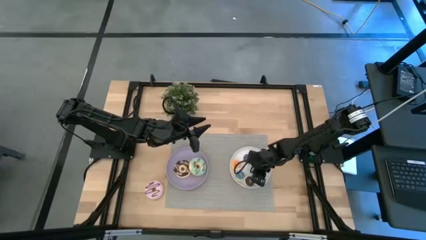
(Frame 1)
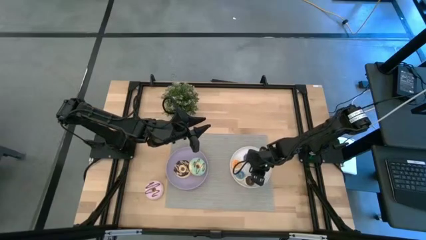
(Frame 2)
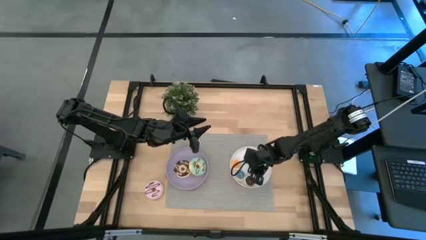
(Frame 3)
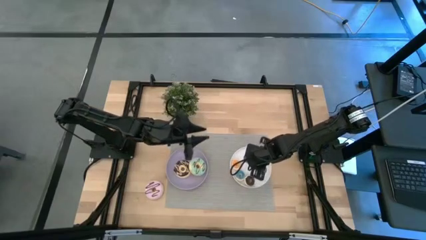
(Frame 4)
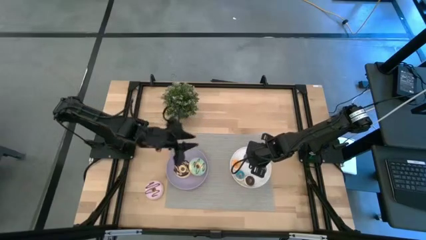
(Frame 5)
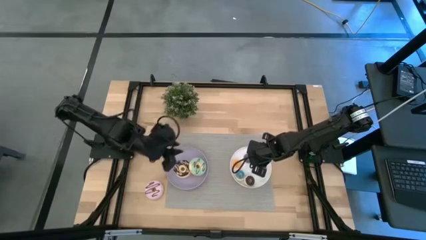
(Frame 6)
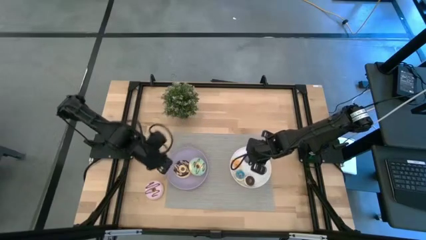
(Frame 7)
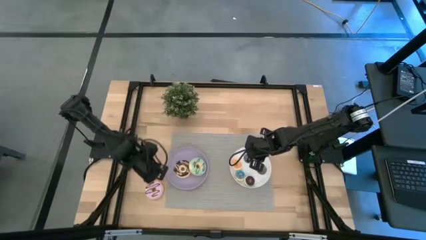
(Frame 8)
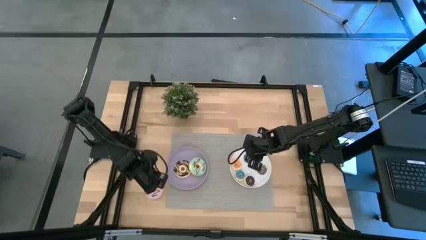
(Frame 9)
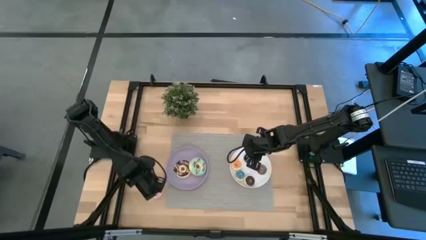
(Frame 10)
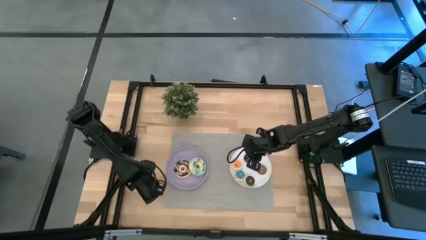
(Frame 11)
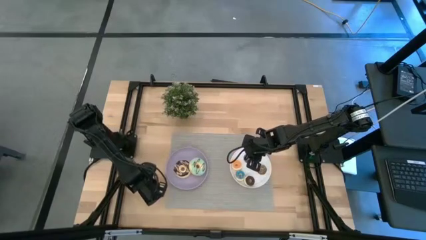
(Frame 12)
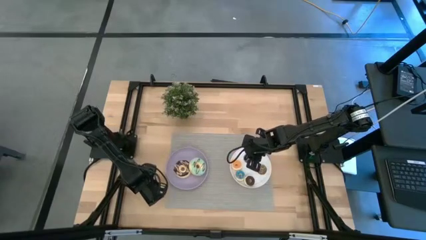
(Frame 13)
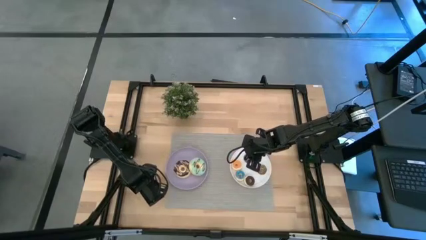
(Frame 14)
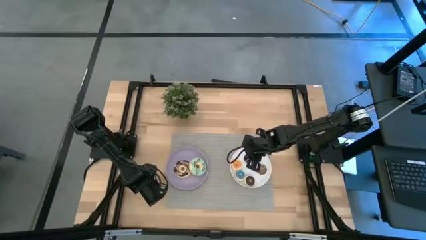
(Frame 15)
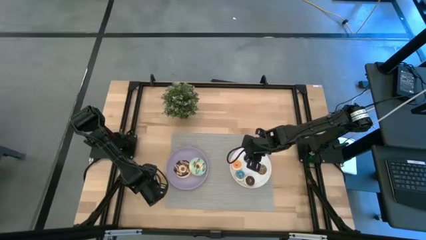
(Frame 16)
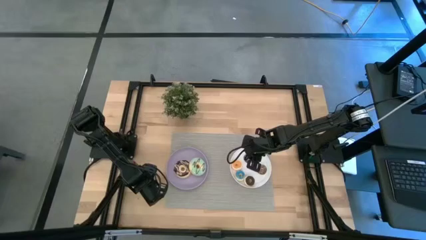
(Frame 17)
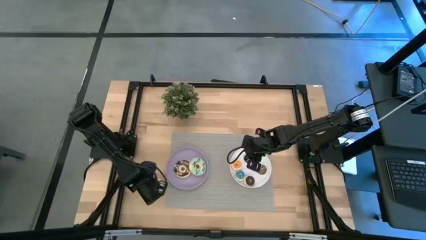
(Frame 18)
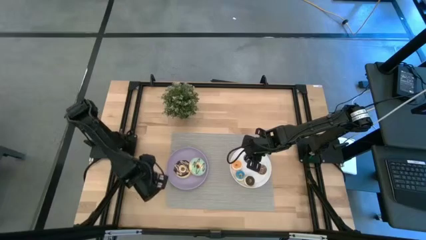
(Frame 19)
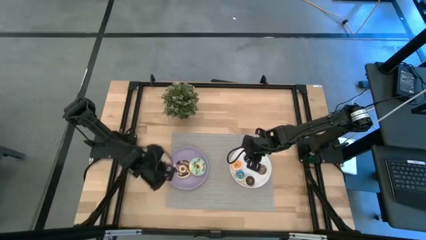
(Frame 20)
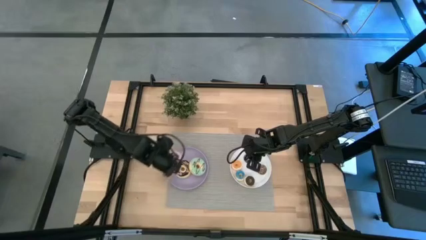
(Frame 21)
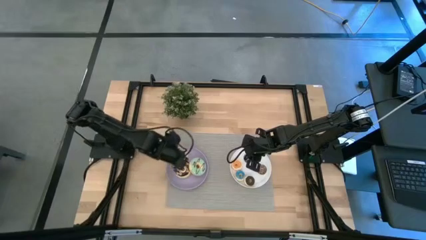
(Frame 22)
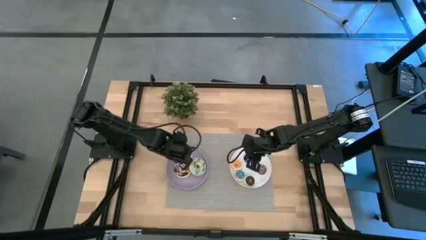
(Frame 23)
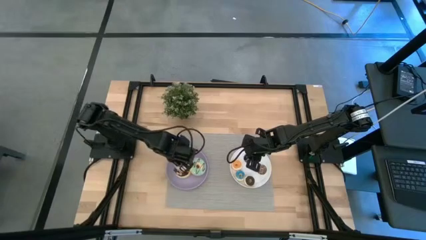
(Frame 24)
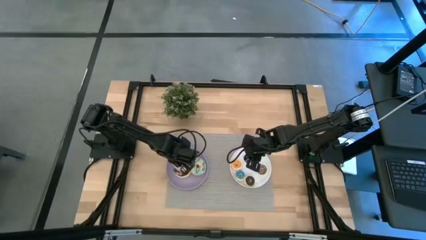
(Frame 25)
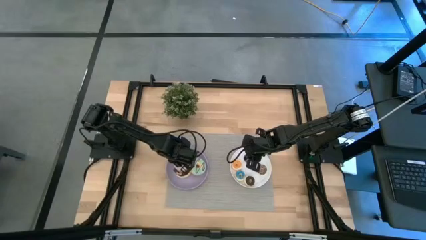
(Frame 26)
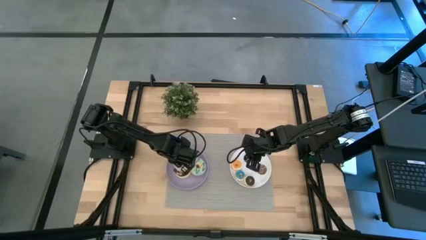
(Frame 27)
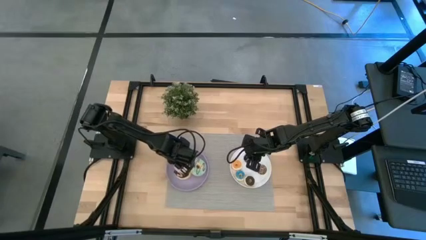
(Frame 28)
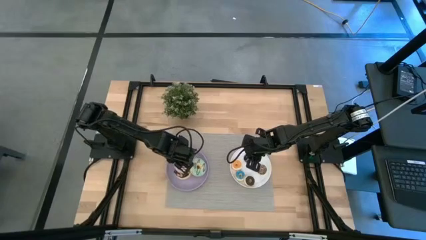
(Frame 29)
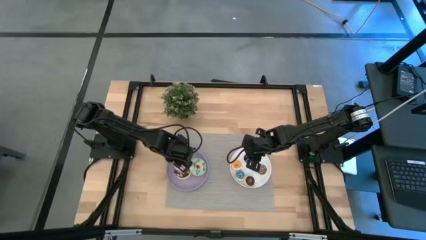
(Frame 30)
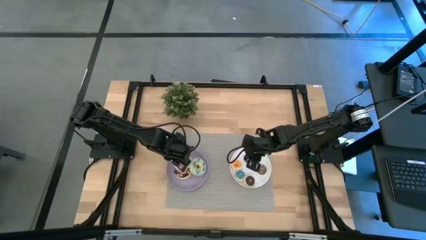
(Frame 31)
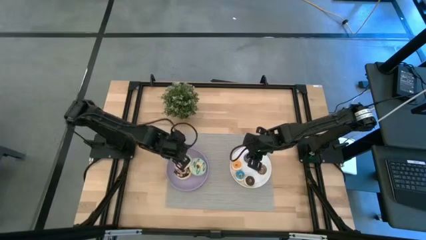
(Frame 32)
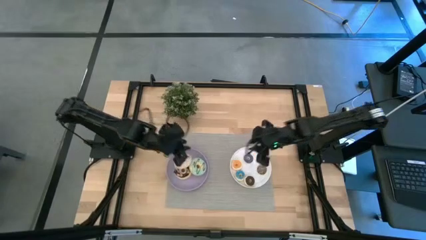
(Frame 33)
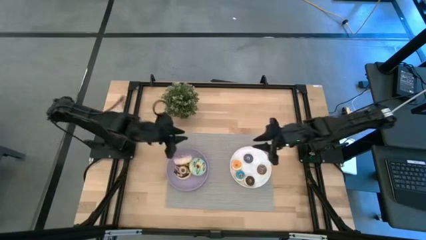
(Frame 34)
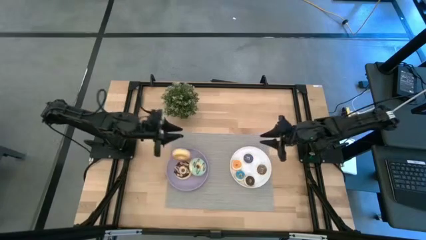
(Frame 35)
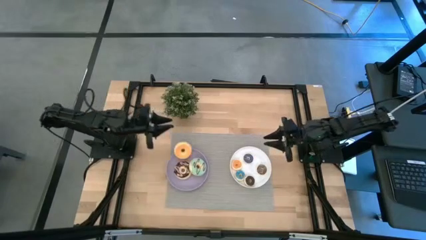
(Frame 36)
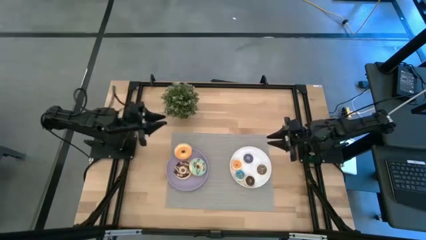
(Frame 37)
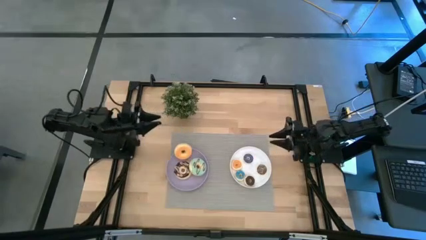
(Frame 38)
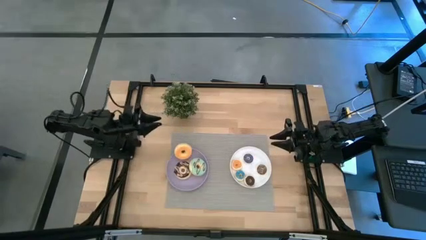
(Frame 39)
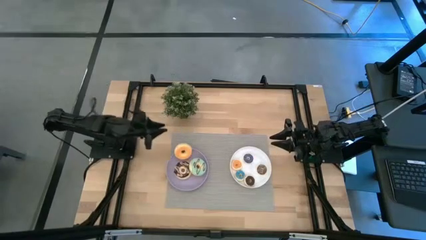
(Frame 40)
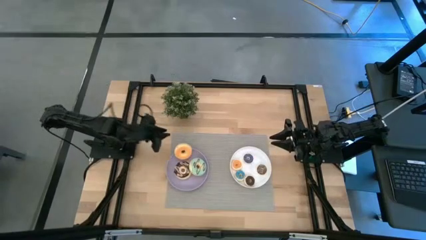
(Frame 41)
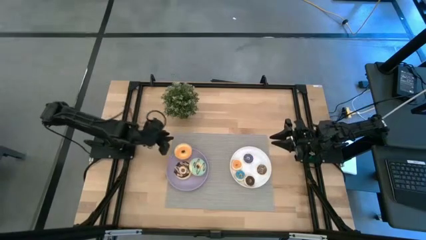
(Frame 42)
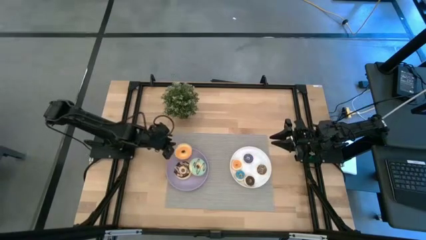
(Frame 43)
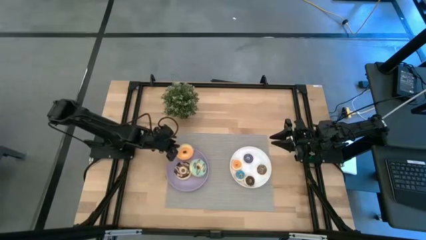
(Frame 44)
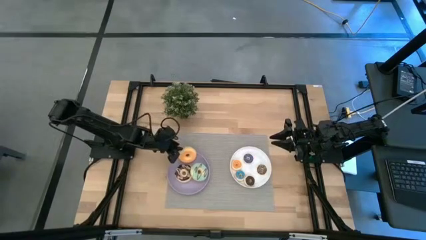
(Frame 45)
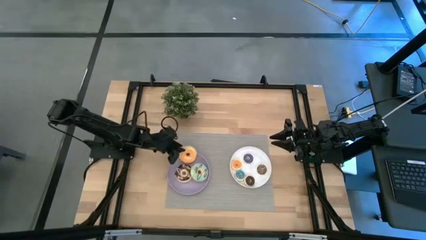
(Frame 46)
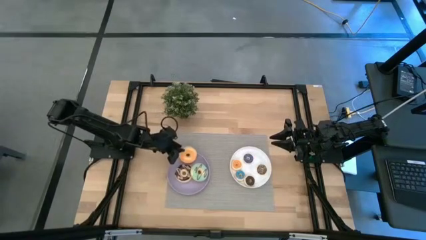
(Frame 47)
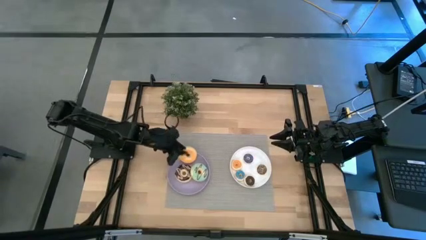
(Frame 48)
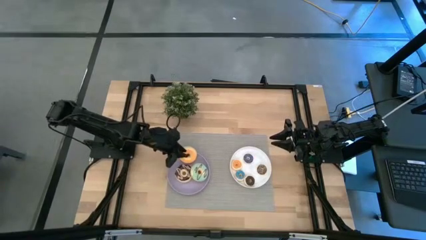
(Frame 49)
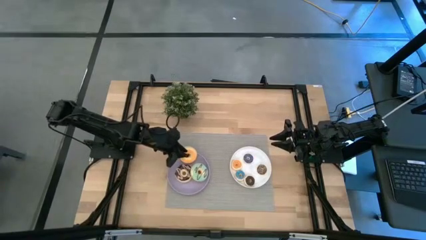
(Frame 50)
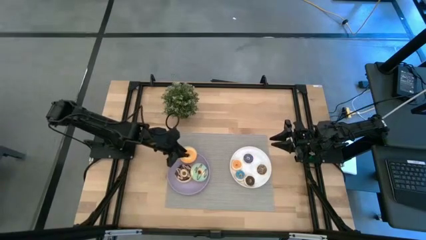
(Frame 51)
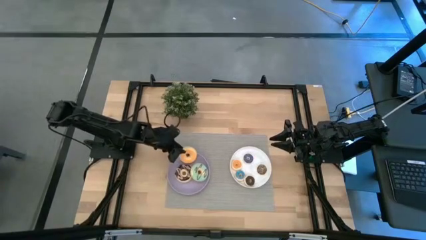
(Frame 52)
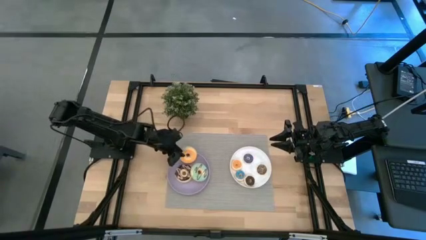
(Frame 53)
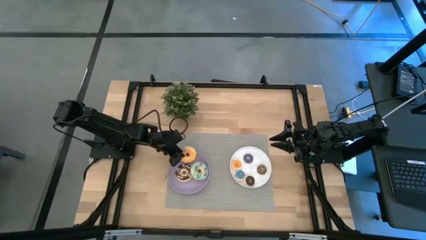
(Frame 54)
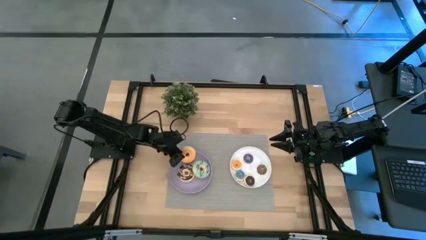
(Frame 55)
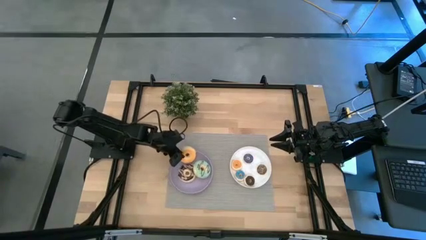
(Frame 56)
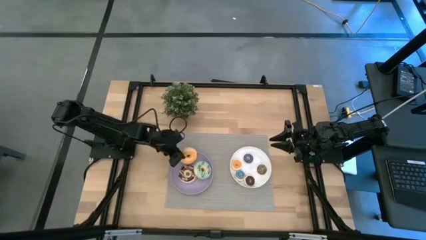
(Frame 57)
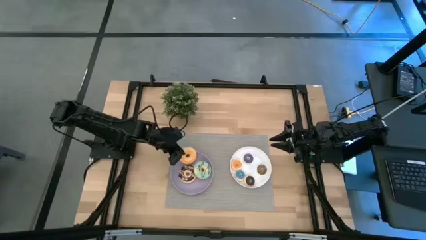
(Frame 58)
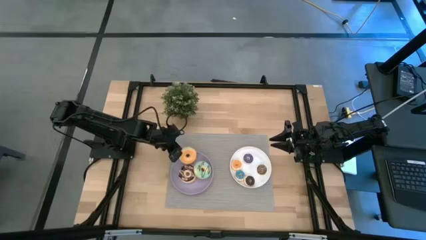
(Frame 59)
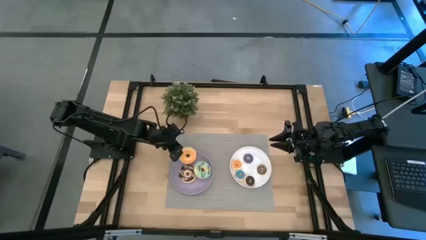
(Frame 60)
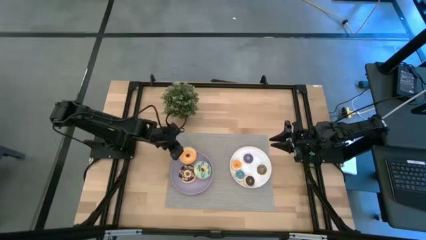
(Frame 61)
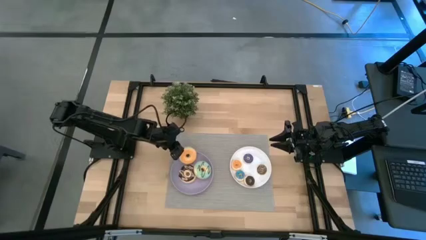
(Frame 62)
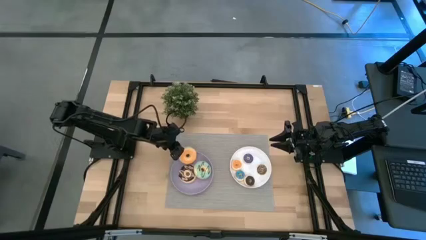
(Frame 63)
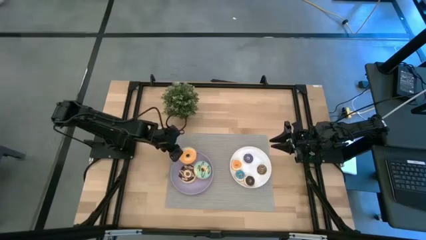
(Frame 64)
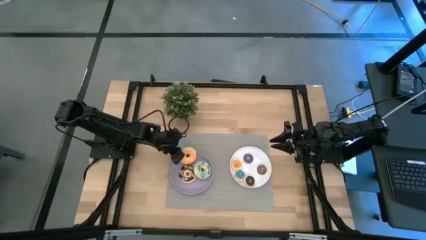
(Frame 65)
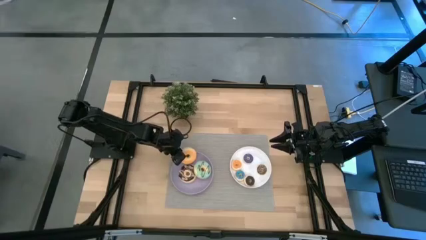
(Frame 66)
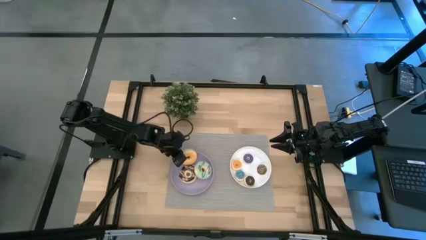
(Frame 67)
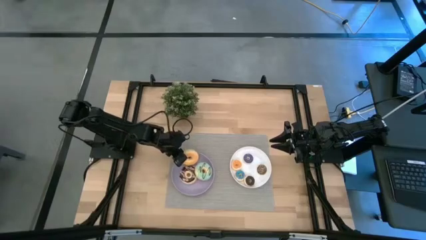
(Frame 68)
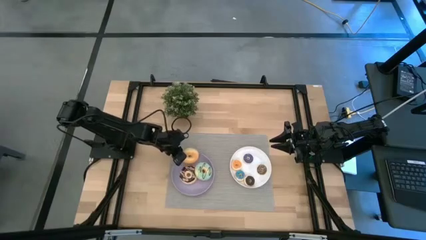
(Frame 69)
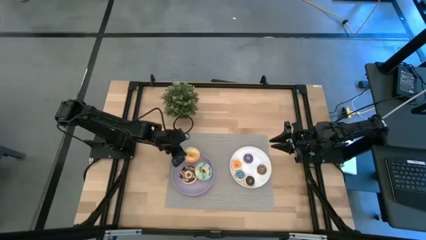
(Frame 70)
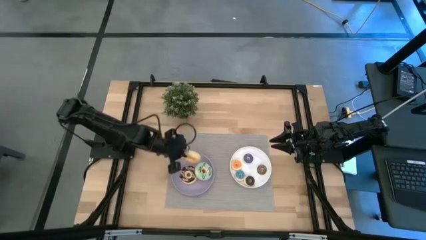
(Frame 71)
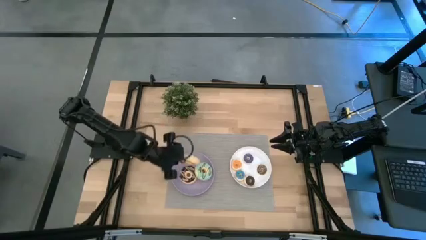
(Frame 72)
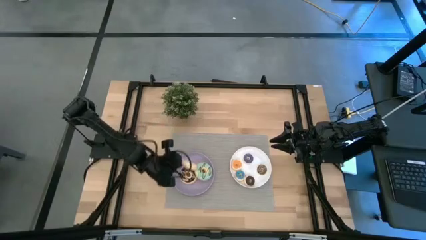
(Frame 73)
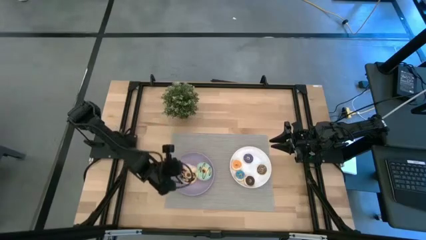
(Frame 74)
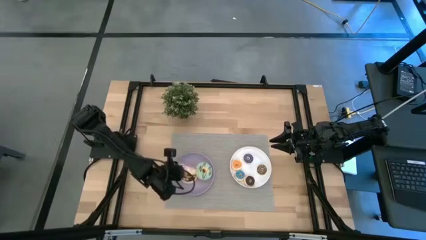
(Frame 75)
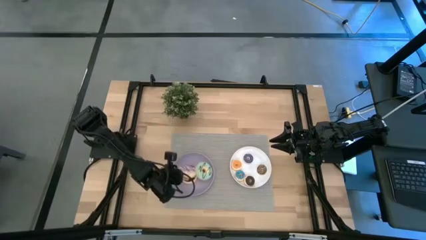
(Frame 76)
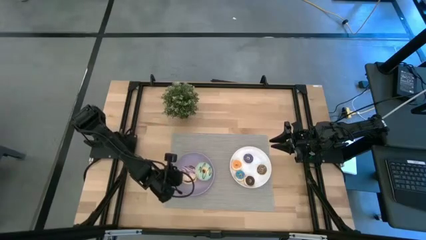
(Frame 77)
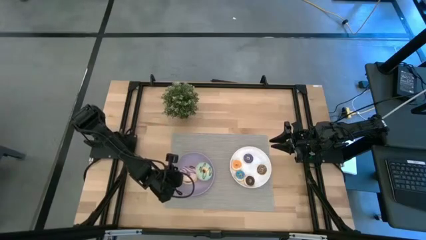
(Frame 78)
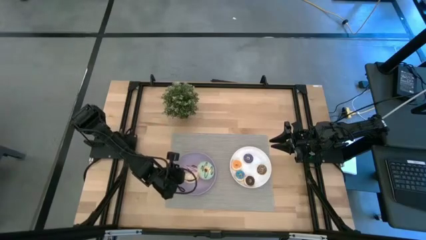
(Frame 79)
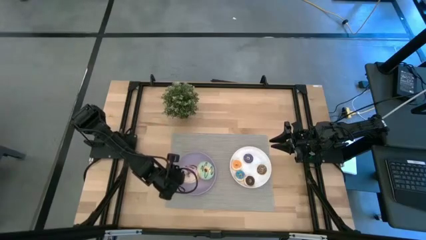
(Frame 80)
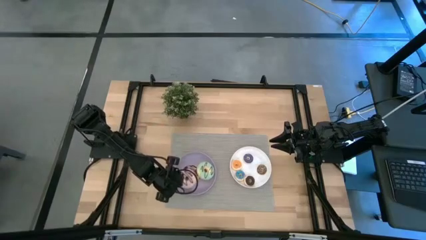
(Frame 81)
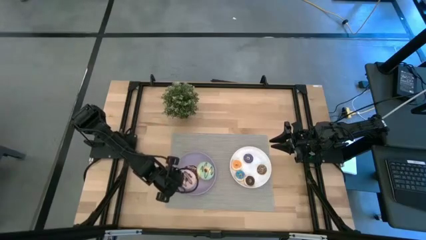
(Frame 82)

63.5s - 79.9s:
Task: Pick & Place donuts
Put the large purple donut on the purple plate
